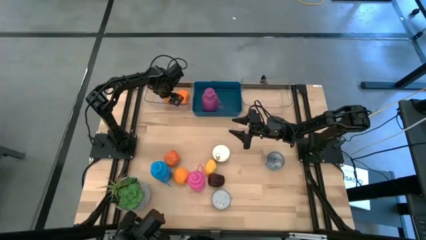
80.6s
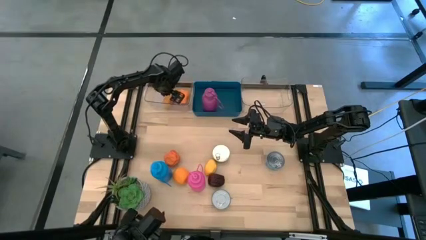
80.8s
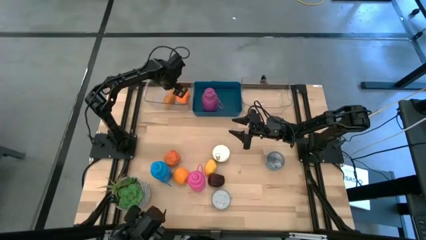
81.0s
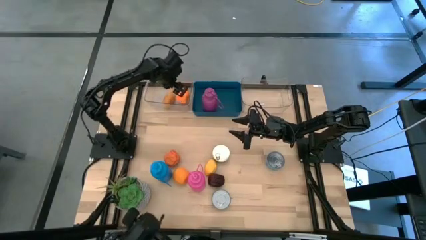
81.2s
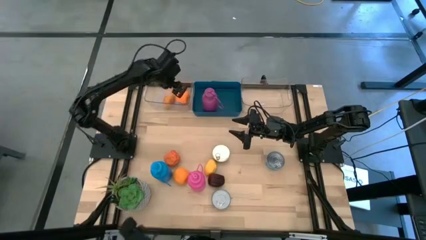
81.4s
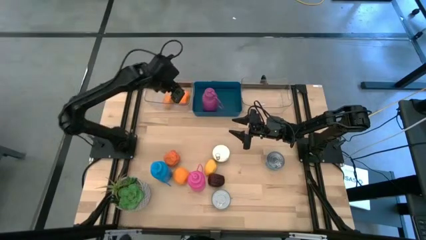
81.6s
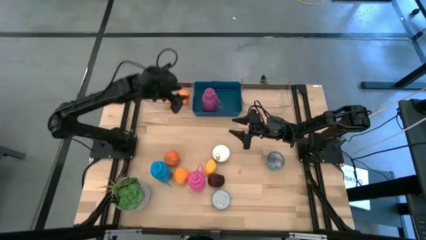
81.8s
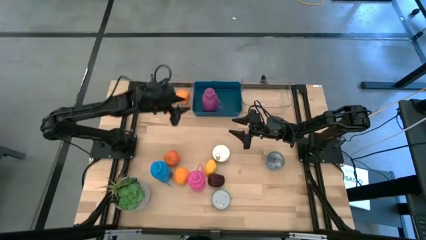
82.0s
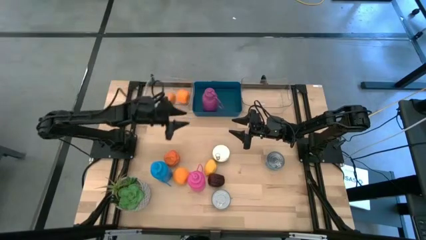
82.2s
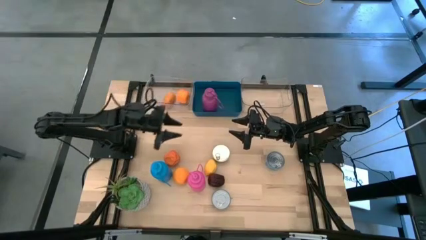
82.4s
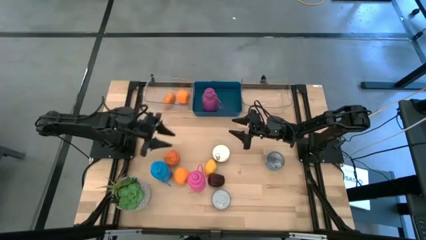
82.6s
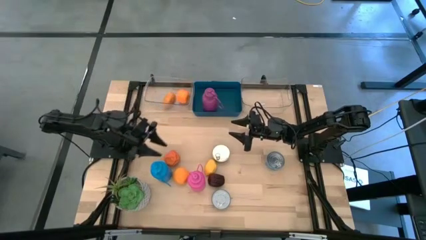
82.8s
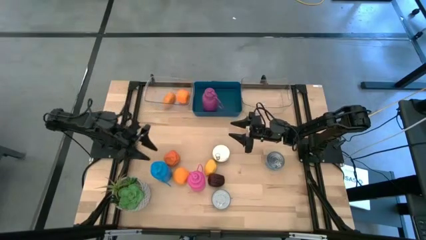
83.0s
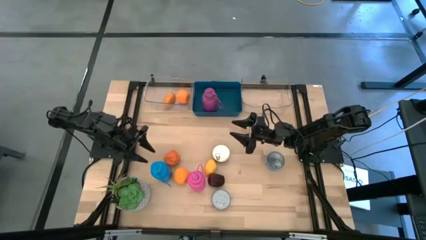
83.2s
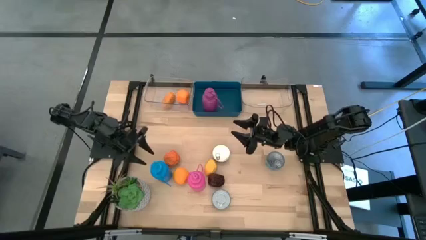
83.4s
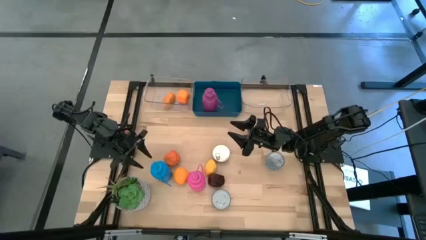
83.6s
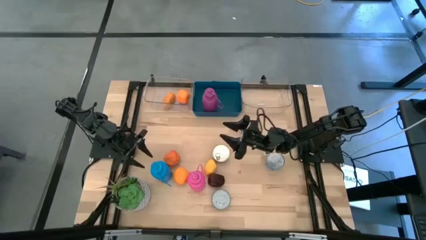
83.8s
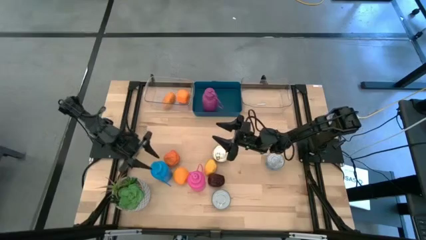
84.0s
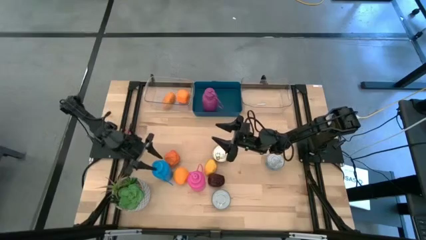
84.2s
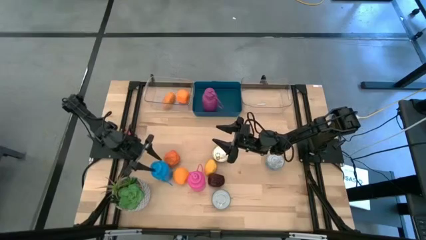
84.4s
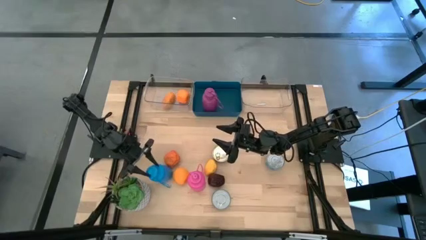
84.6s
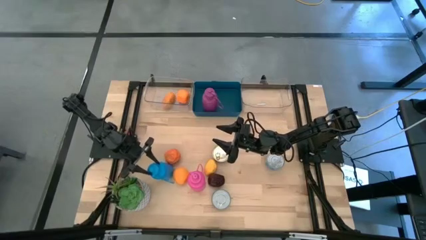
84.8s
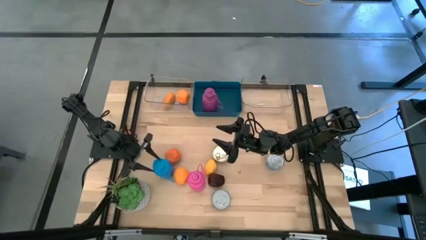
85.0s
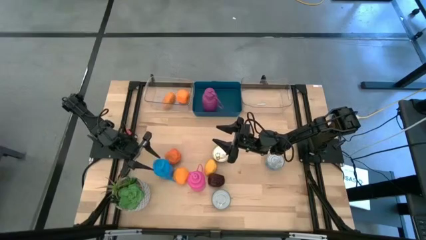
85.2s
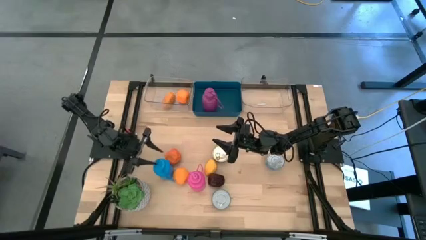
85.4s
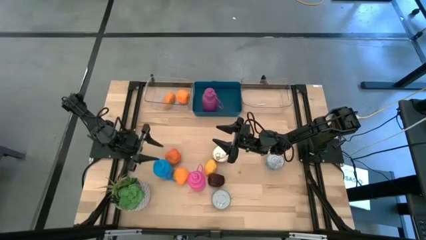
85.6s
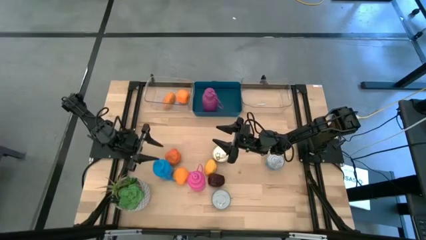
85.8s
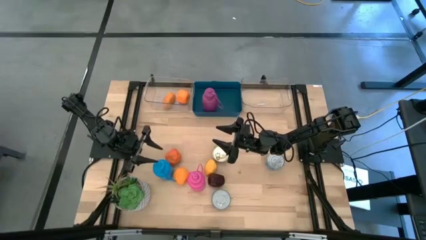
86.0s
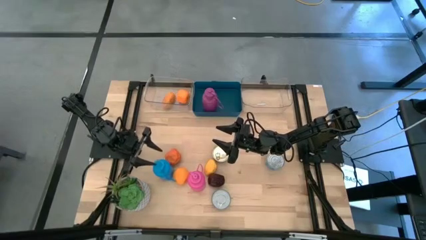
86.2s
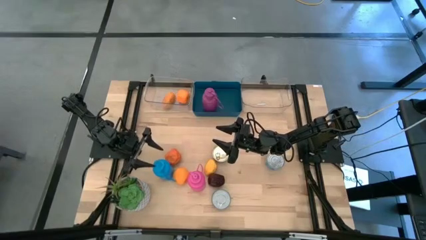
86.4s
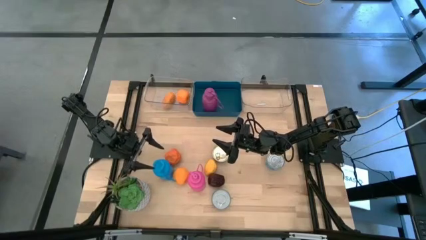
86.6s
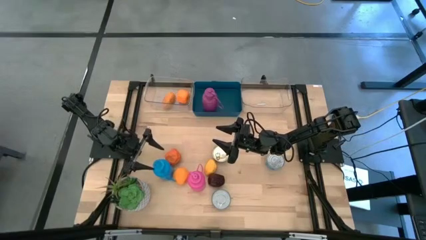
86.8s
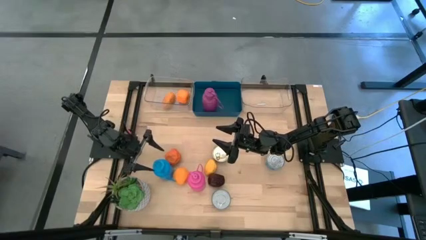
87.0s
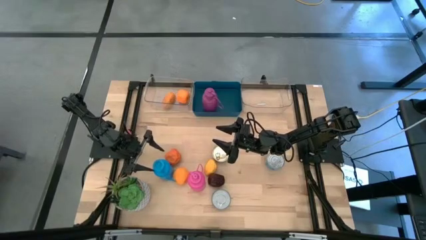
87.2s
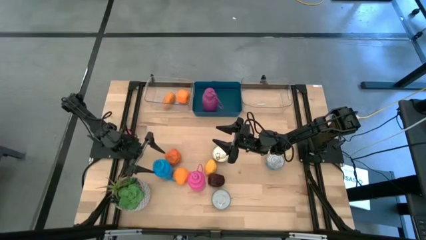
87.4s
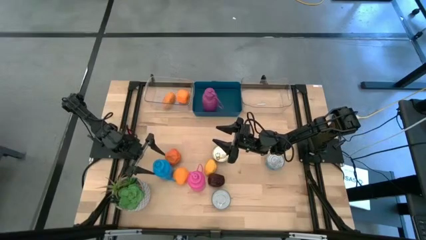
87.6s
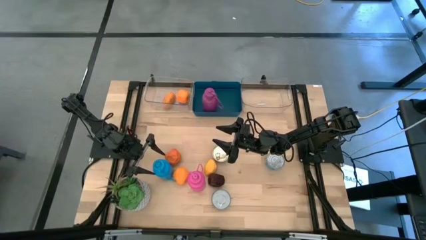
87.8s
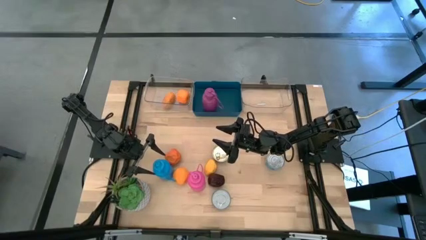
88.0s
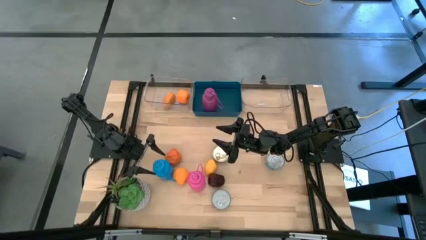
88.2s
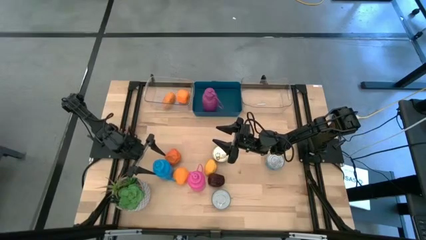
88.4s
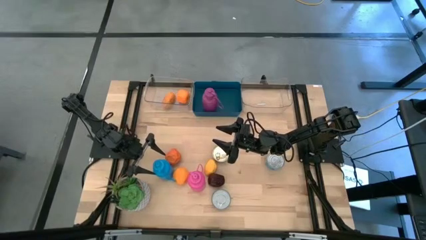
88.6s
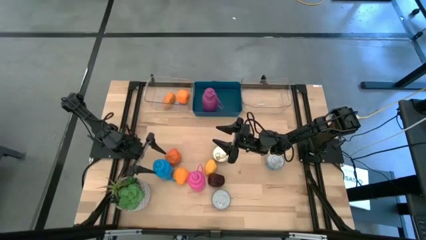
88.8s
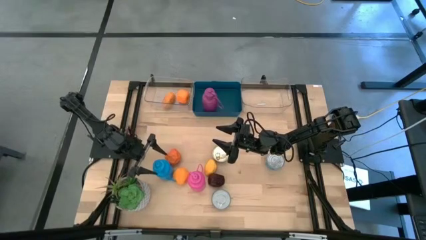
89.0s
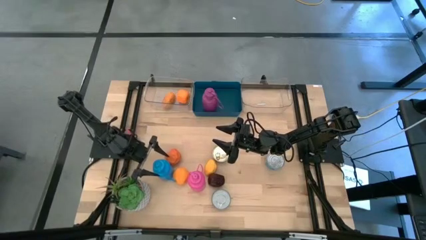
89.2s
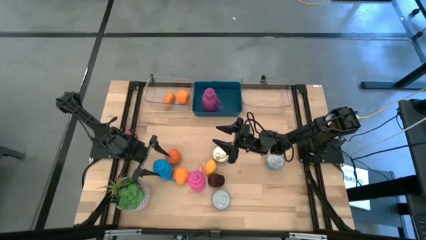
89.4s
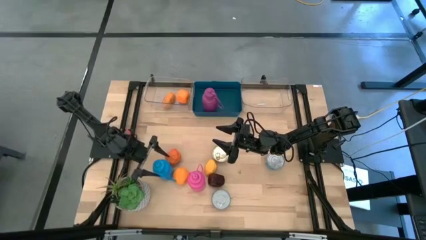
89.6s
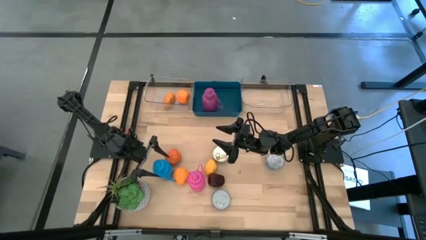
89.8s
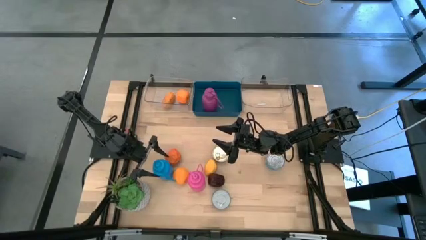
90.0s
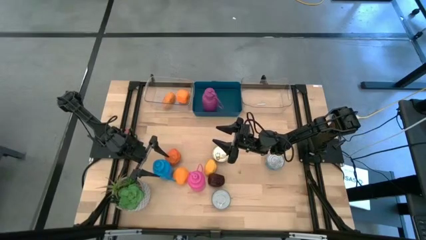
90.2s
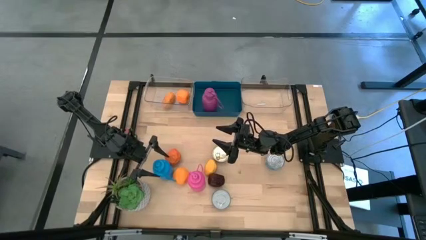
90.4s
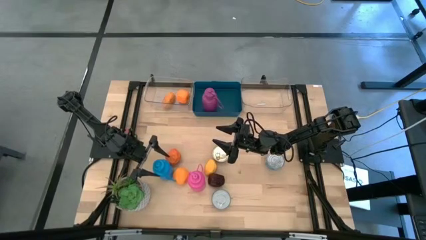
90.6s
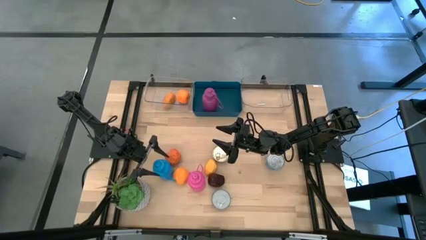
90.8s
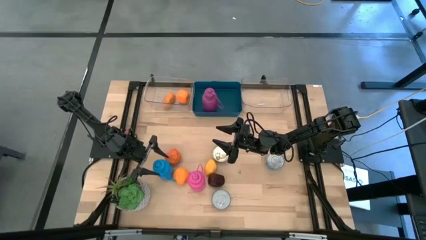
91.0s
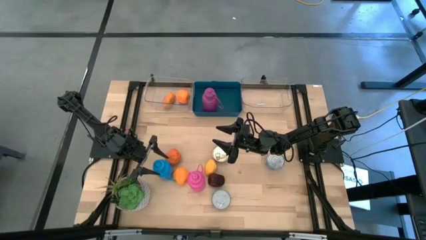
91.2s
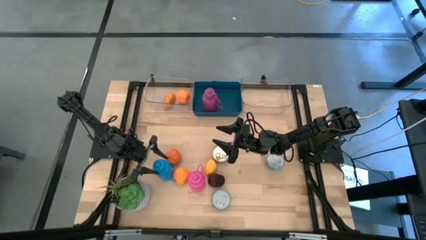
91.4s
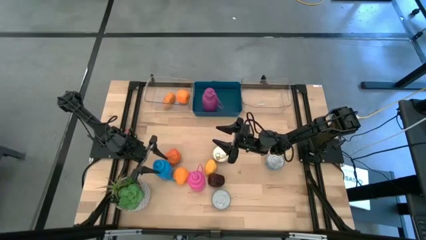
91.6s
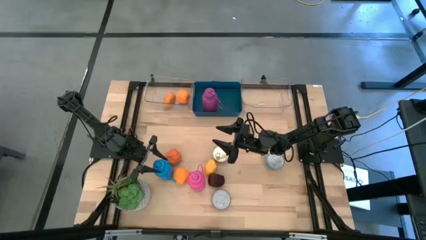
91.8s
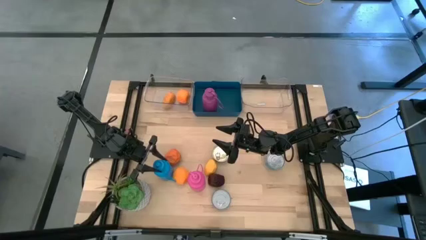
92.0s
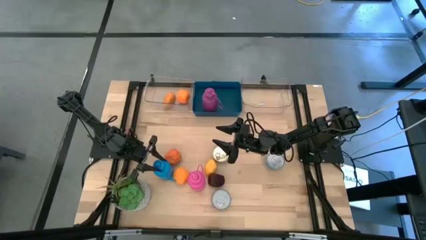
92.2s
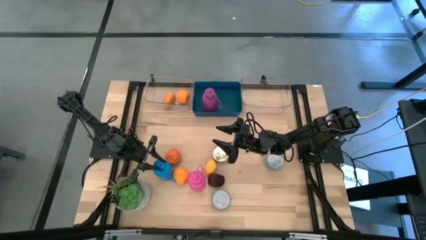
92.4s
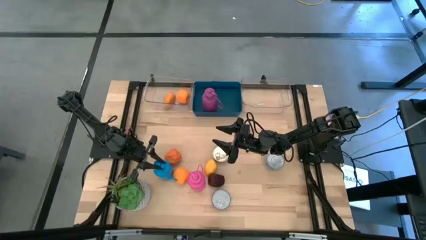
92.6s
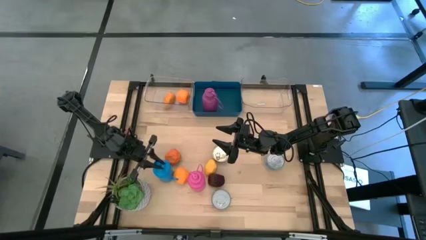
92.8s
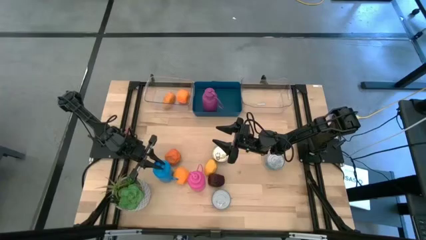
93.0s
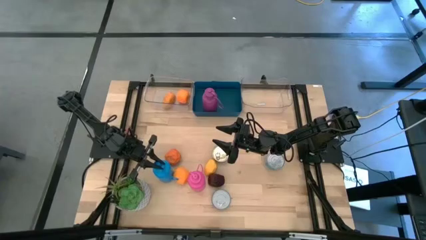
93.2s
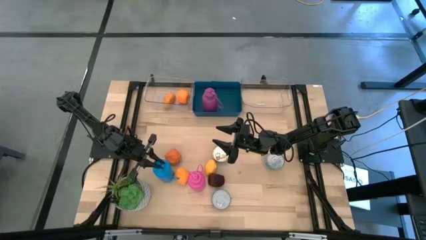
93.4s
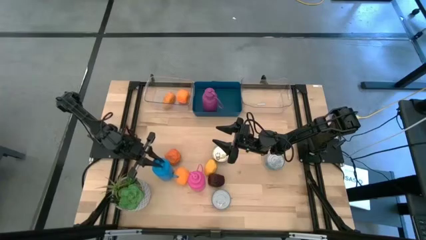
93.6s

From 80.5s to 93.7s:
Task: Pick & Place Food Item
Put the blue water bottle into the blue bin

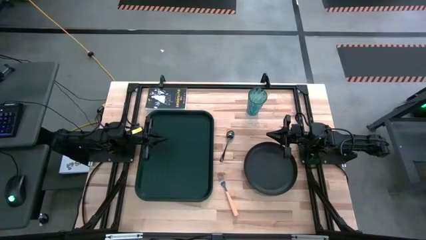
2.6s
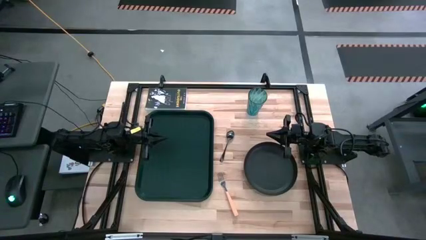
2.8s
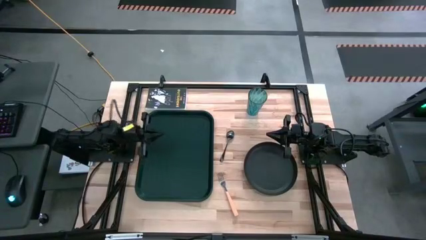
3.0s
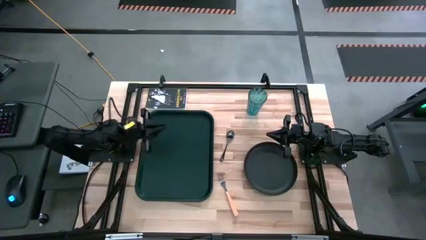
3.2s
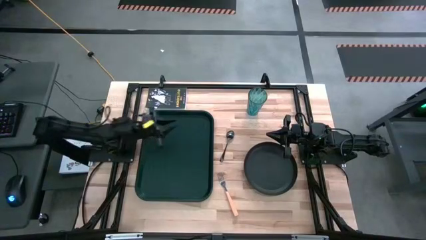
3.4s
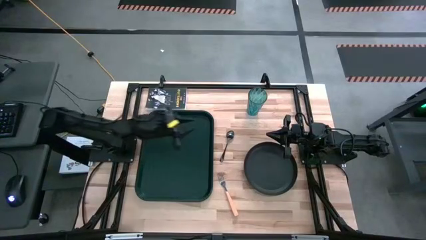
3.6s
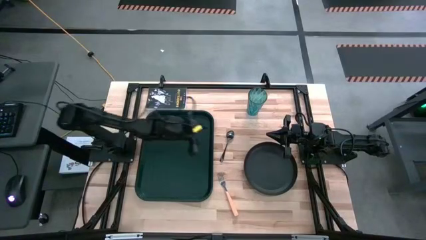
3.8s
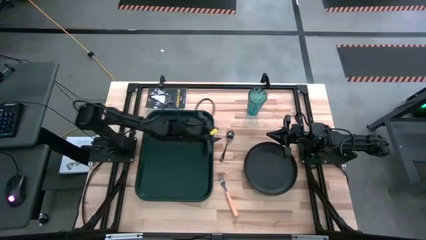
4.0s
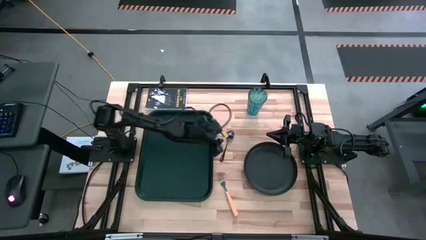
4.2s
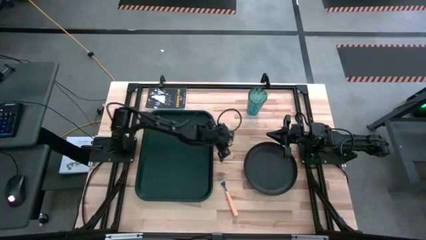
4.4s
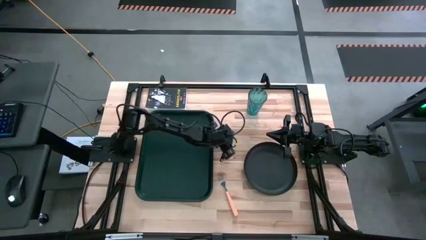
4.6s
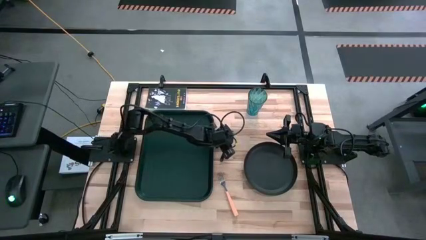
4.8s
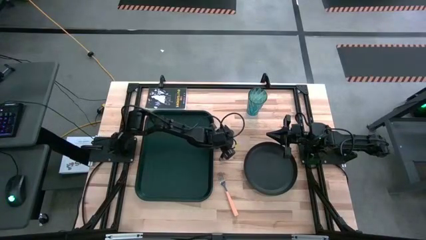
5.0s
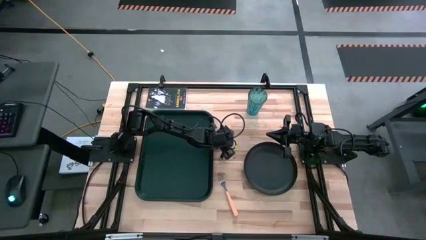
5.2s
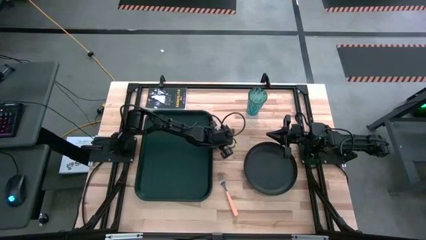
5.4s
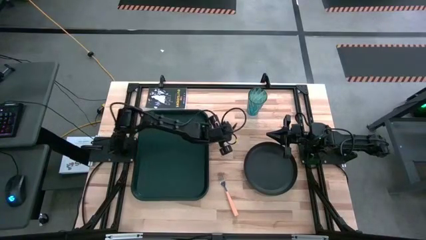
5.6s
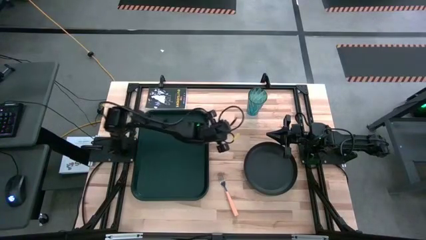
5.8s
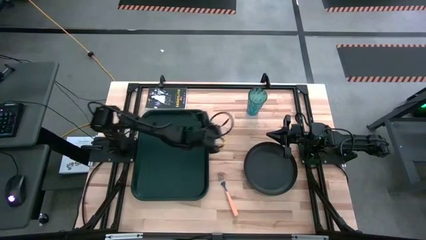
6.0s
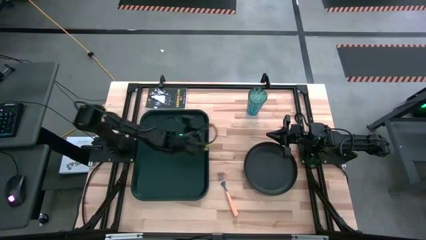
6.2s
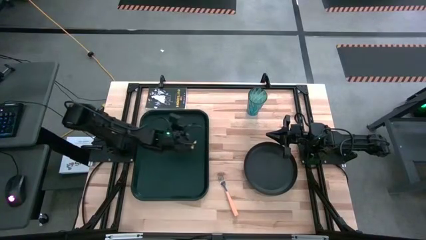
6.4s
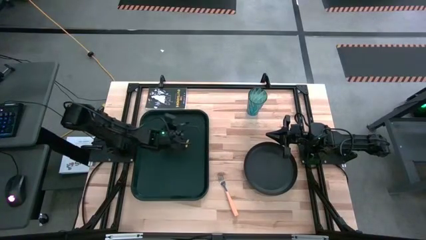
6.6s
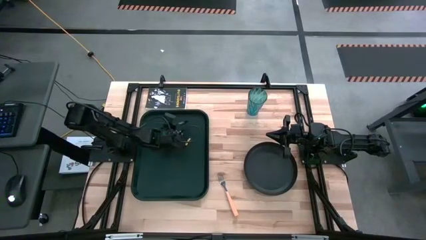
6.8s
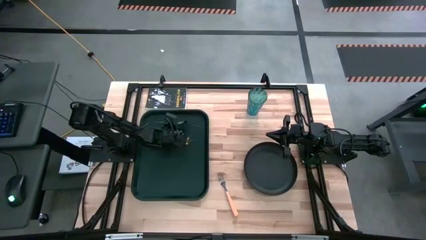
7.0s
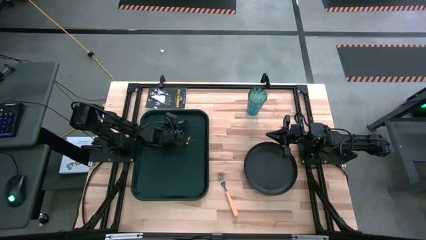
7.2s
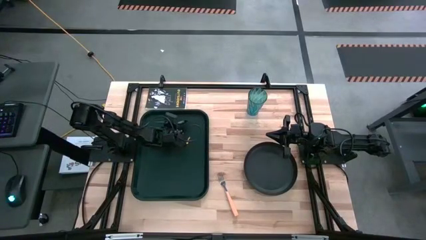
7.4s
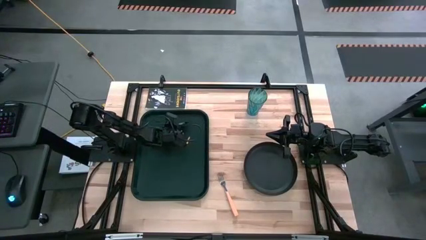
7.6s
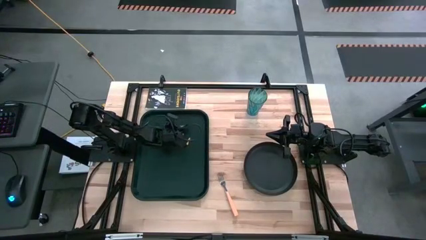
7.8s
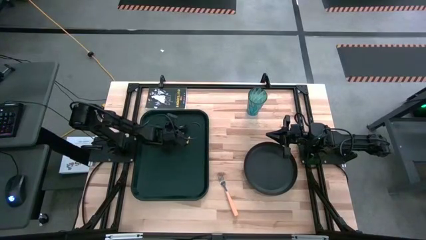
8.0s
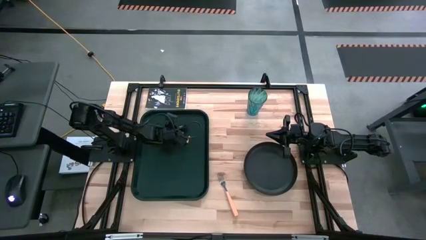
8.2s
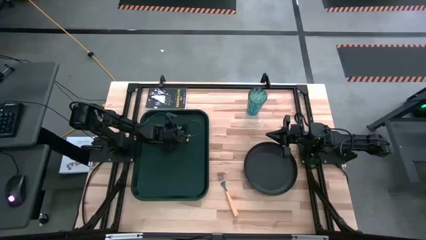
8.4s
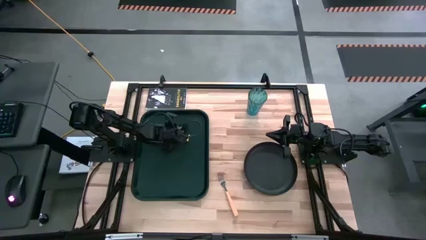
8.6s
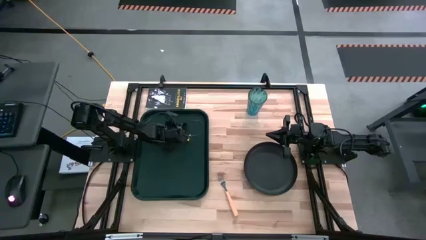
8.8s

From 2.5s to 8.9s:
Task: Pick and place plate/cup/fork/spoon on tray
Put the spoon on the left side of the tray
